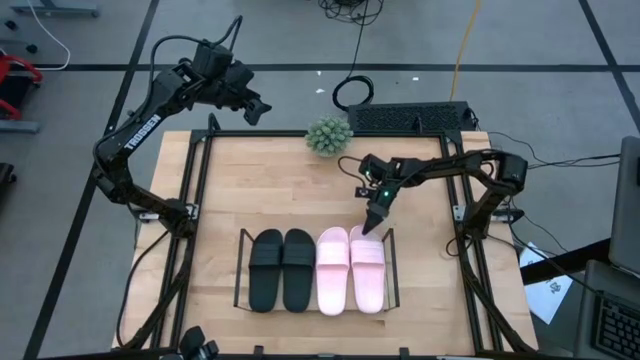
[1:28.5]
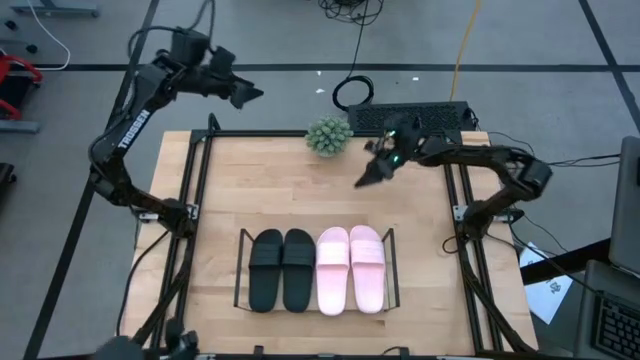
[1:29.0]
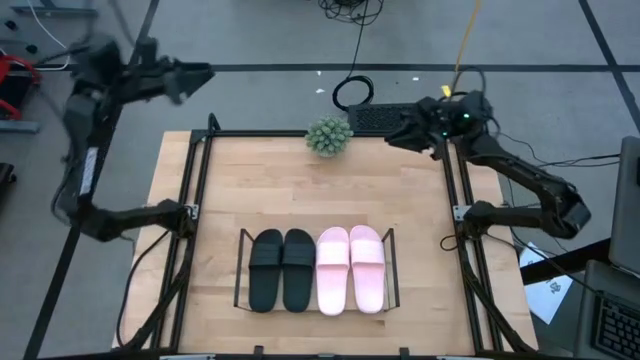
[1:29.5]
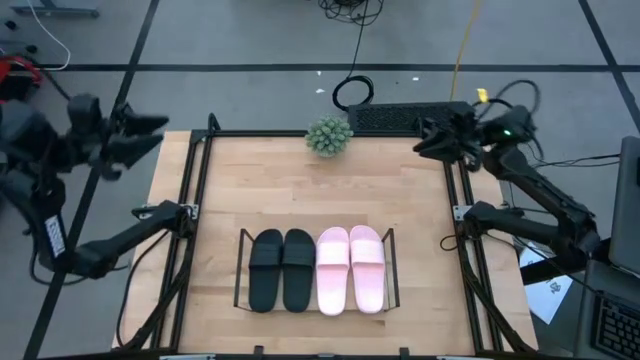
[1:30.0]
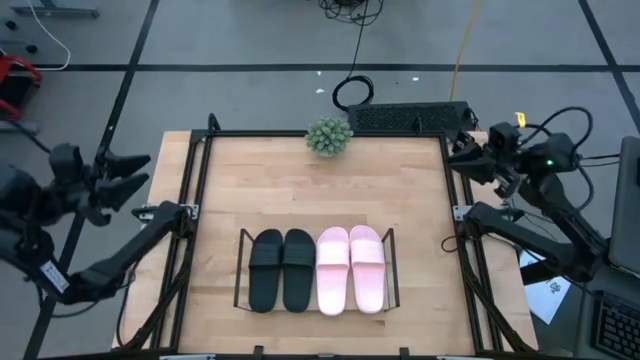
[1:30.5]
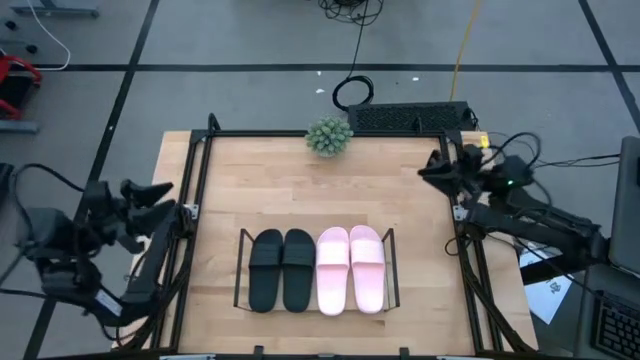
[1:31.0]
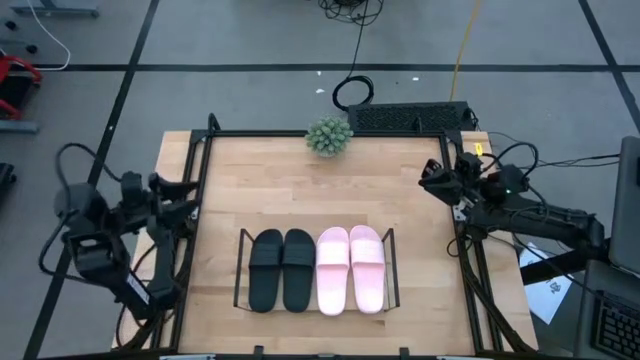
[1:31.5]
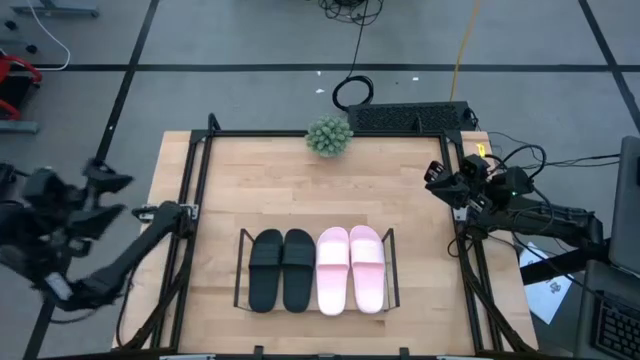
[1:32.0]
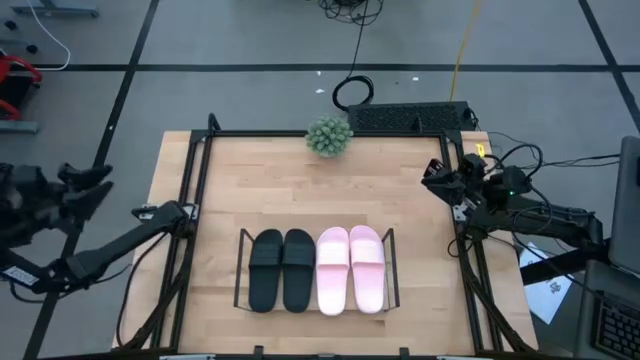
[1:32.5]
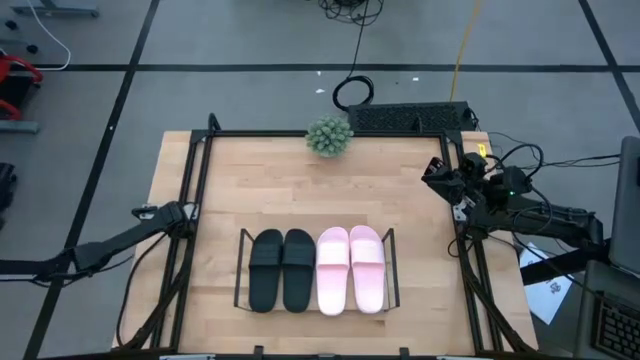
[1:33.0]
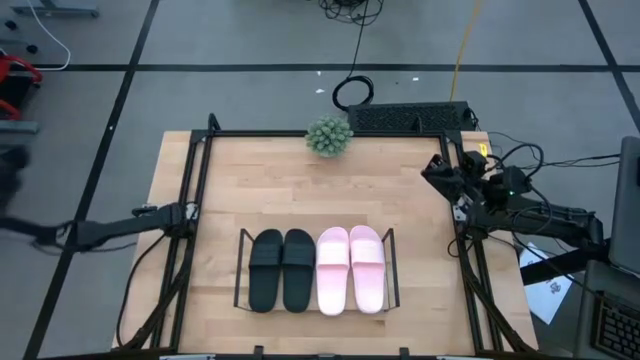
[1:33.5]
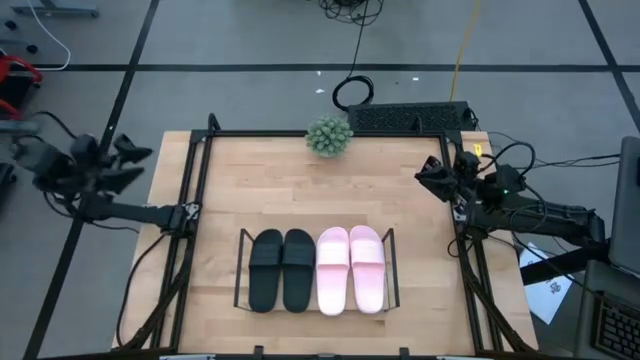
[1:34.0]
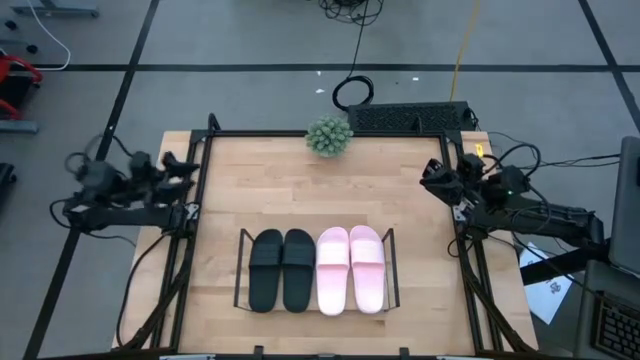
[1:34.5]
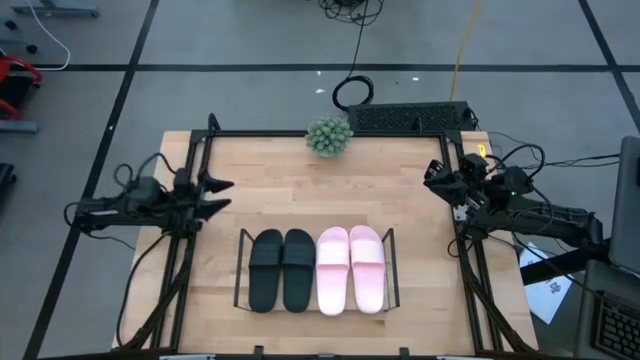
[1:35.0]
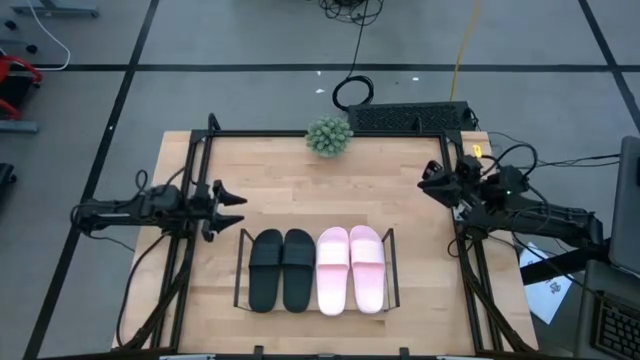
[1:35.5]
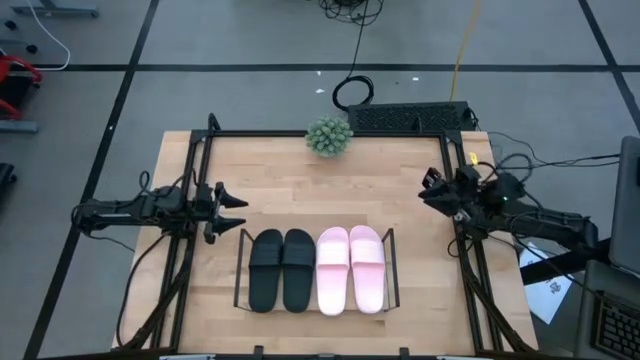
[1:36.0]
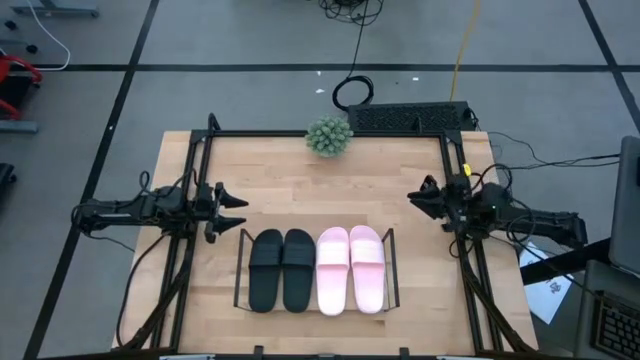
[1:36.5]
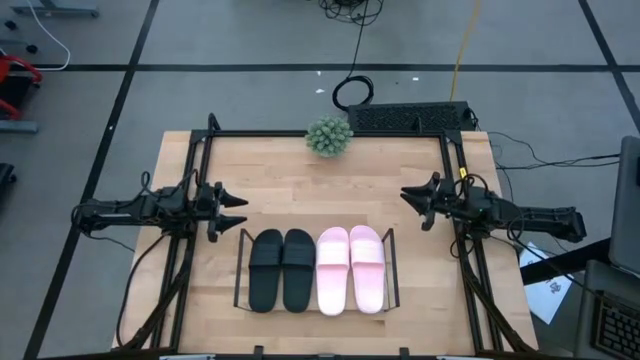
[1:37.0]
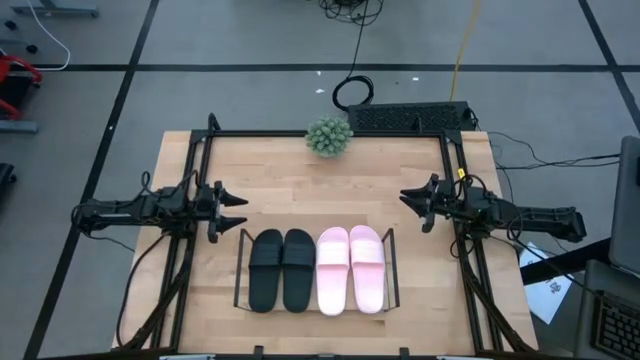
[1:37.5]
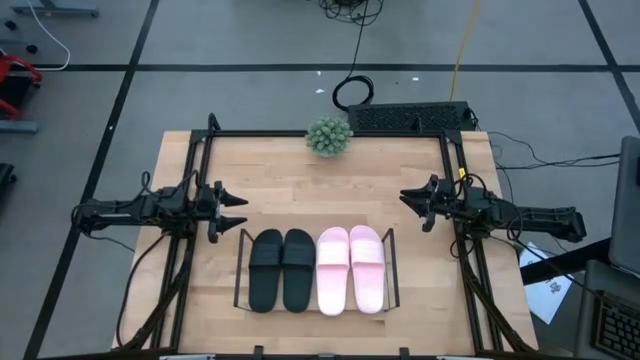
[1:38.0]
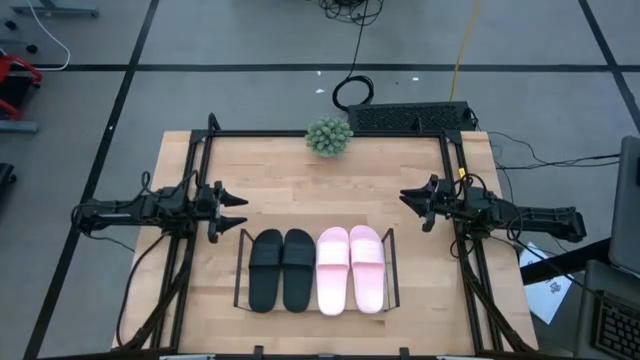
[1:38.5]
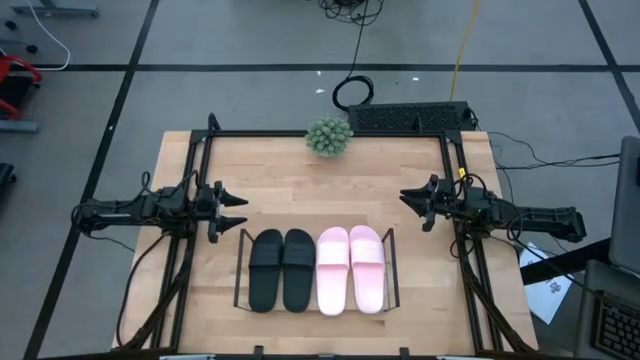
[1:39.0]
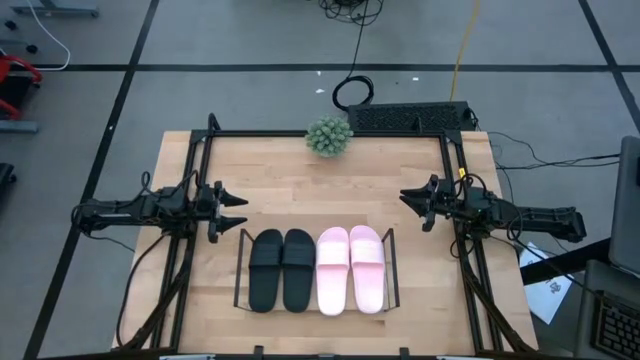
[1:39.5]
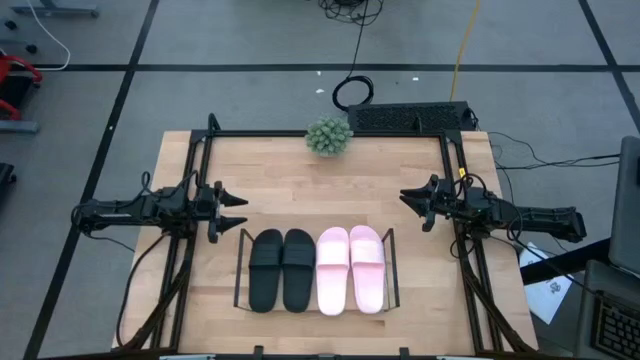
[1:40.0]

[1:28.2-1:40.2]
Task: Pick and place slides into the shelf
Return to Home Position

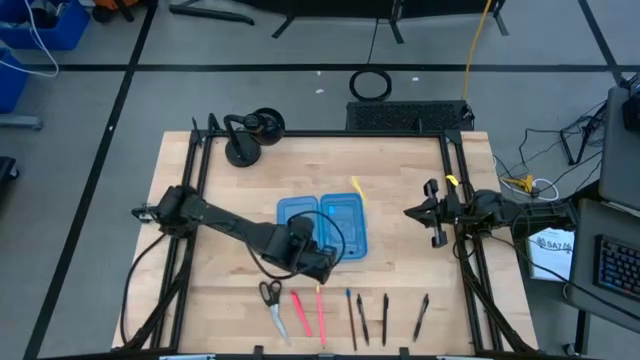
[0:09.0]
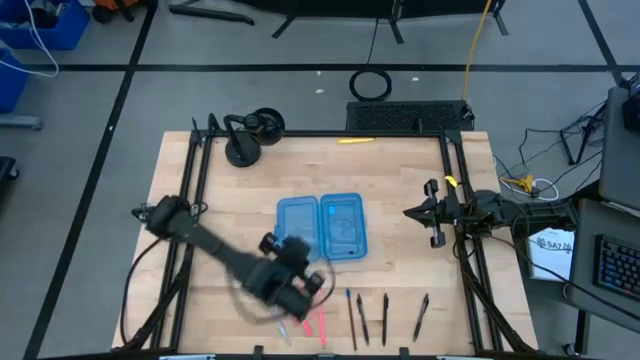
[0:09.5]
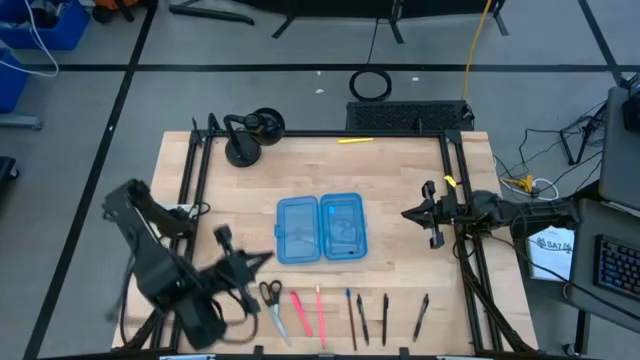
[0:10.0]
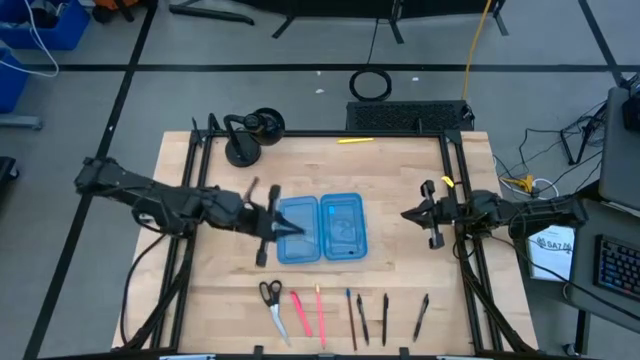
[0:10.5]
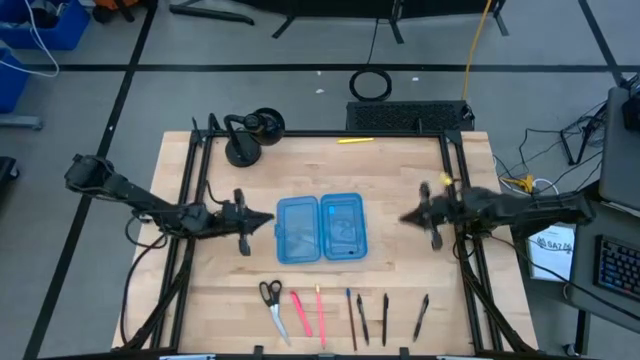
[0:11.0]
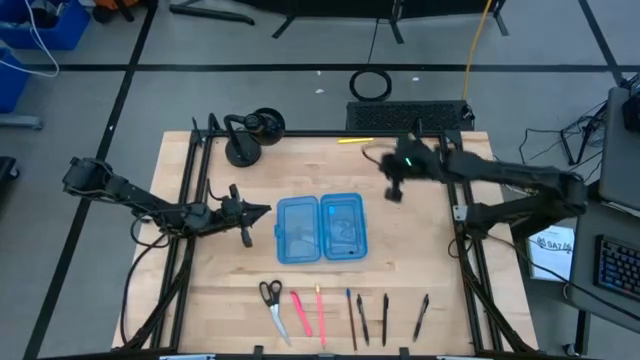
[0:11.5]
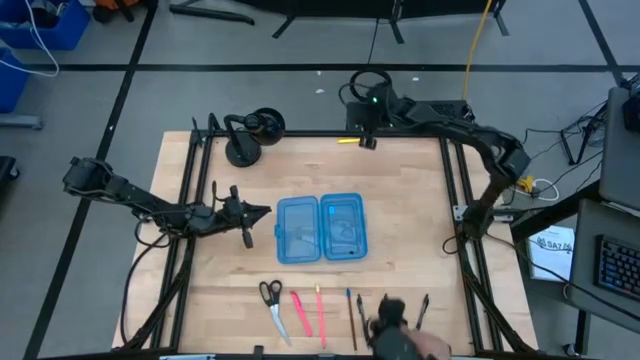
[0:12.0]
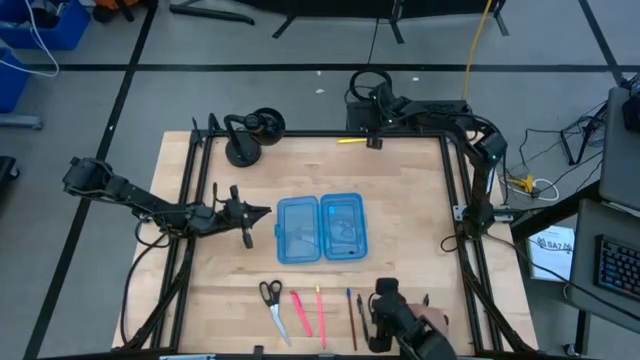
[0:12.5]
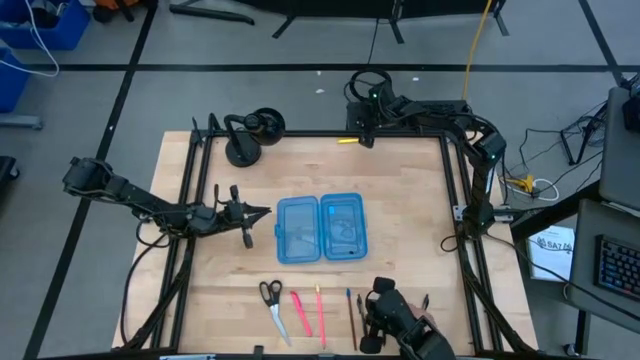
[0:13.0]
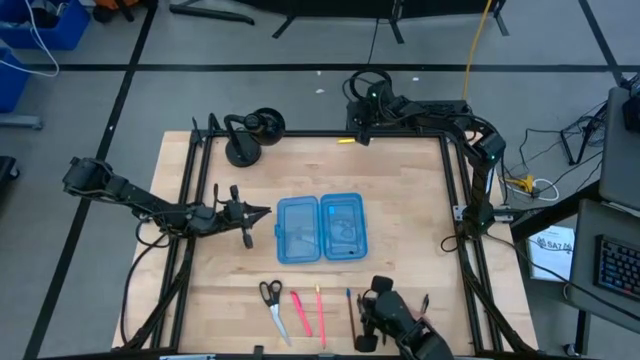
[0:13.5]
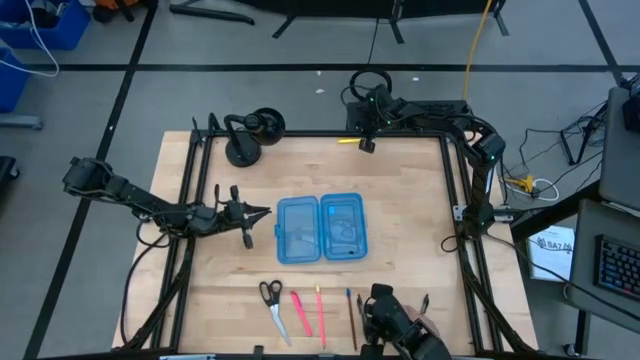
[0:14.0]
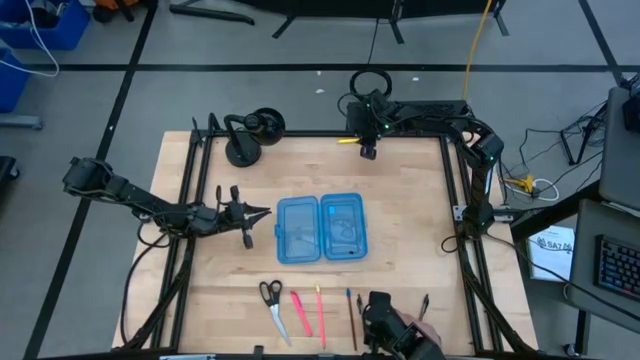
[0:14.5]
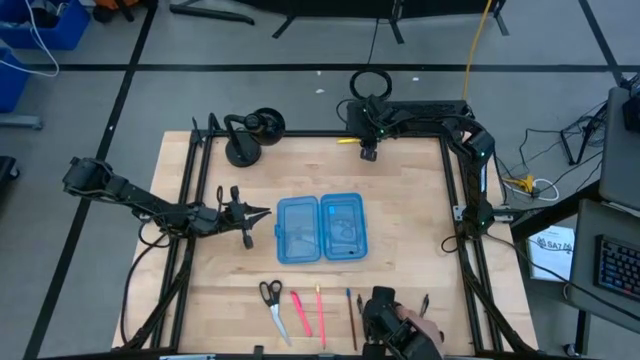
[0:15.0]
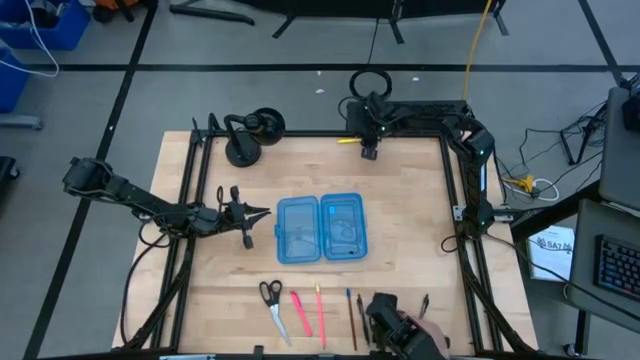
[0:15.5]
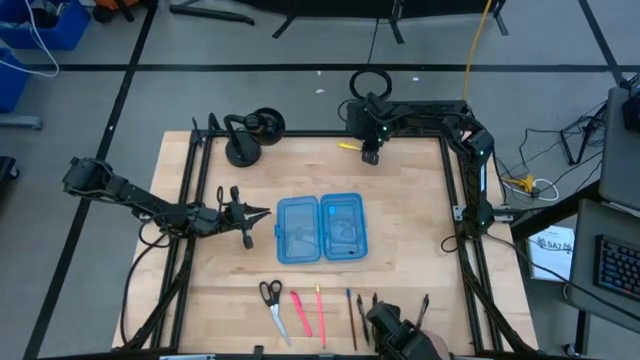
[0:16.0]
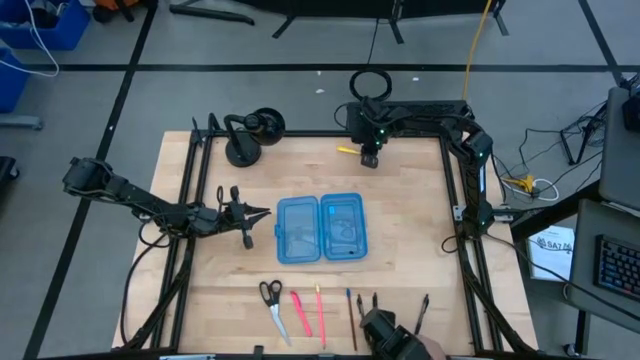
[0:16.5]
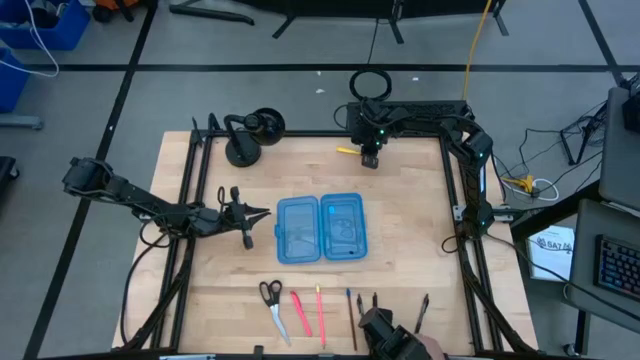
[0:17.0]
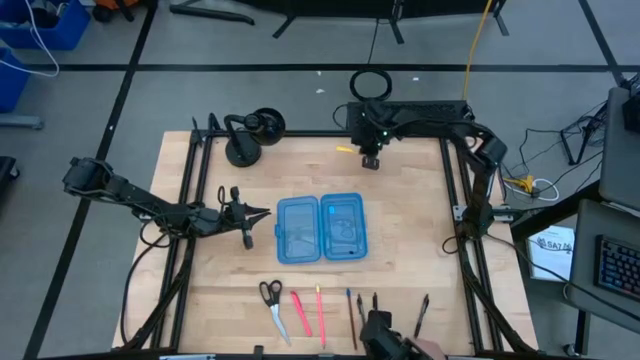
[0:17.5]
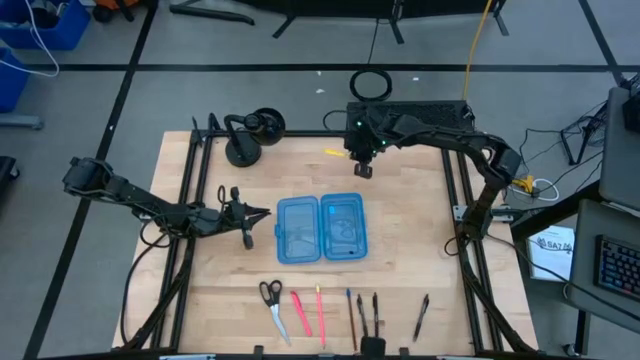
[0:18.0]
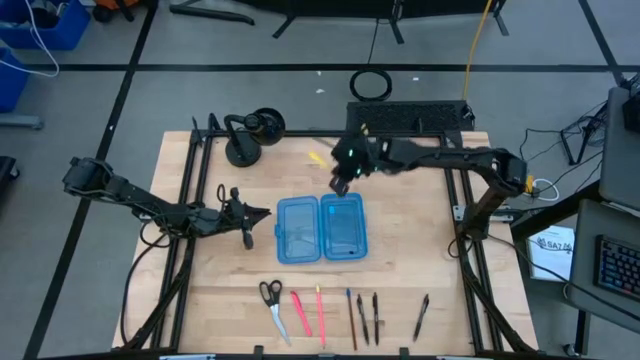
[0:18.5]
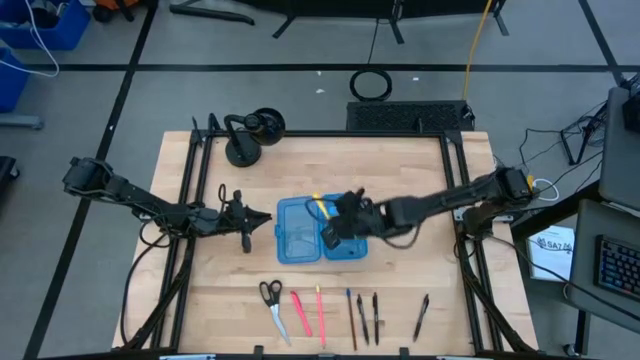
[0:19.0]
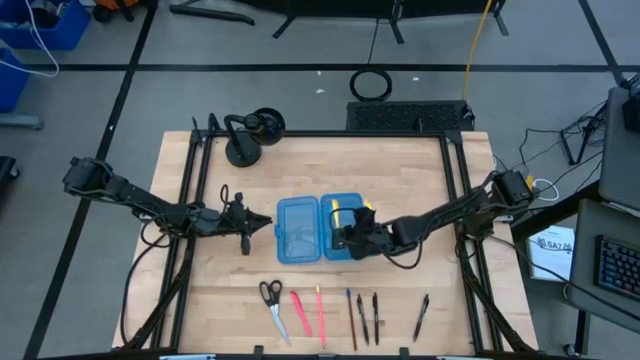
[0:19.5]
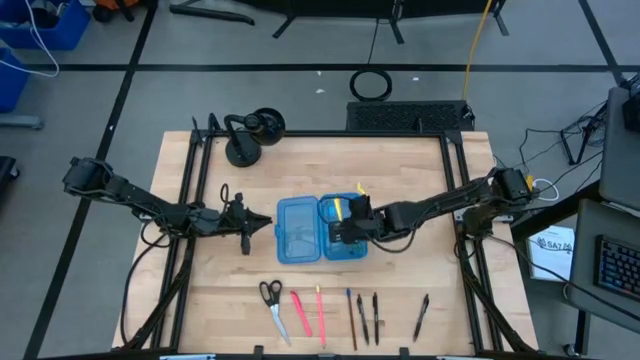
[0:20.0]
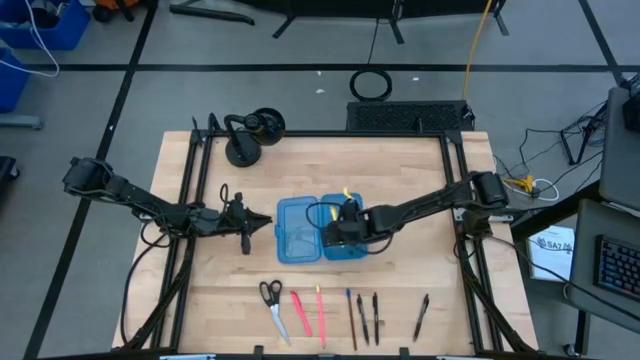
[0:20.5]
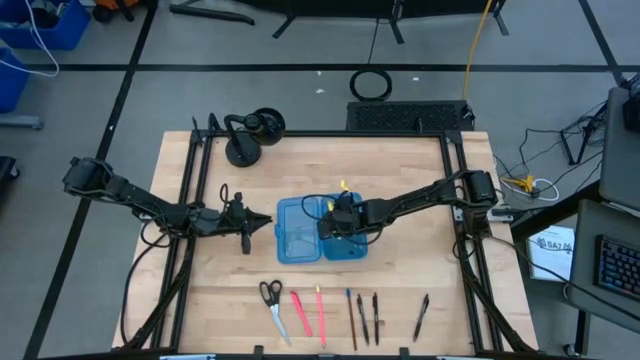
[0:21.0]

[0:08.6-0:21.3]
Task: Pick & place school supplies into a supply box
Put the yellow pen into the blue supply box
